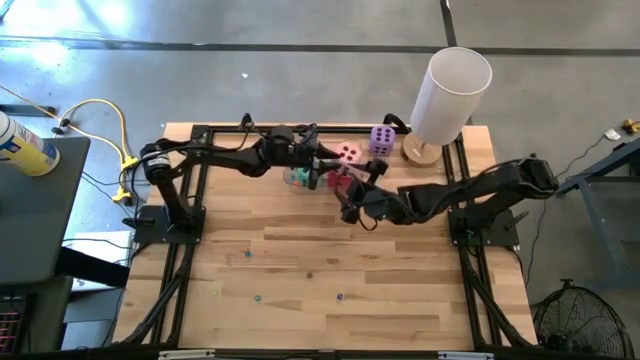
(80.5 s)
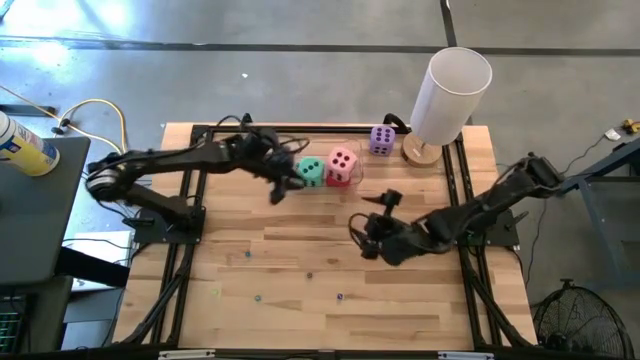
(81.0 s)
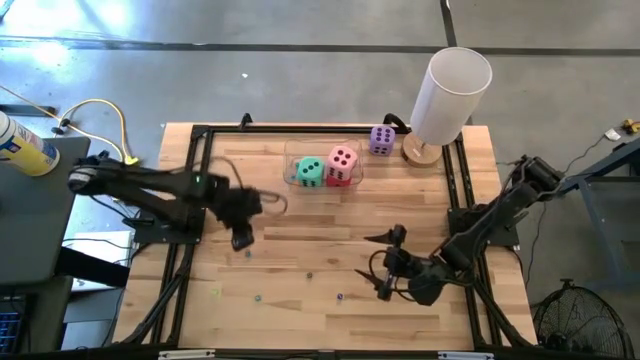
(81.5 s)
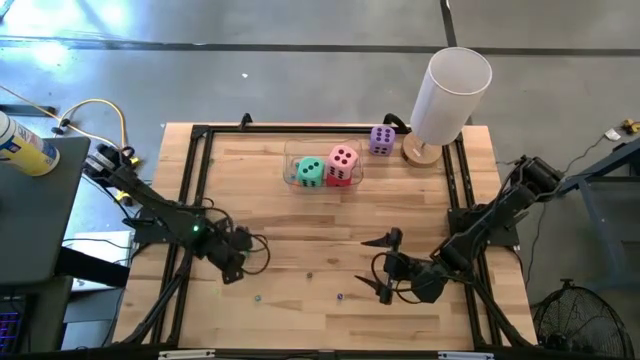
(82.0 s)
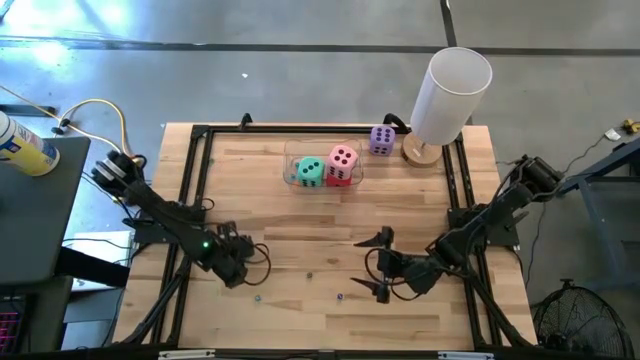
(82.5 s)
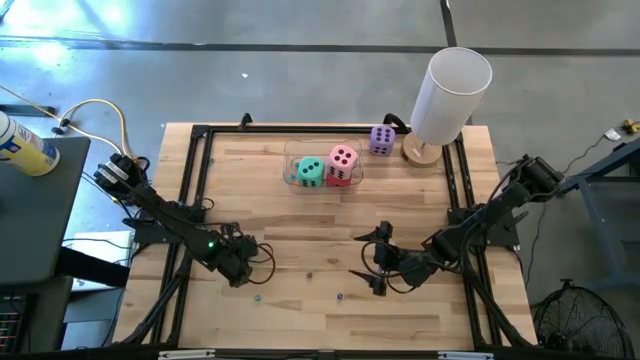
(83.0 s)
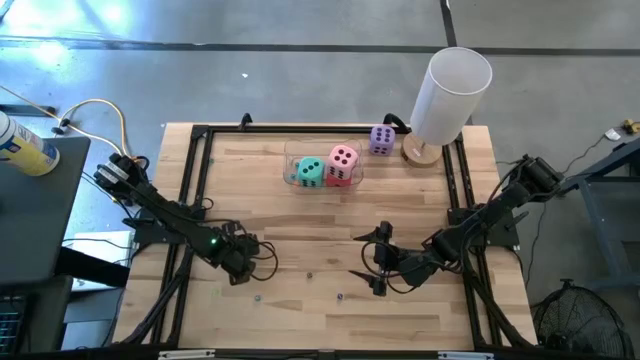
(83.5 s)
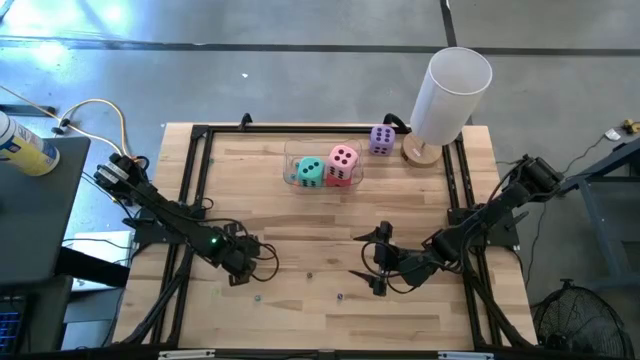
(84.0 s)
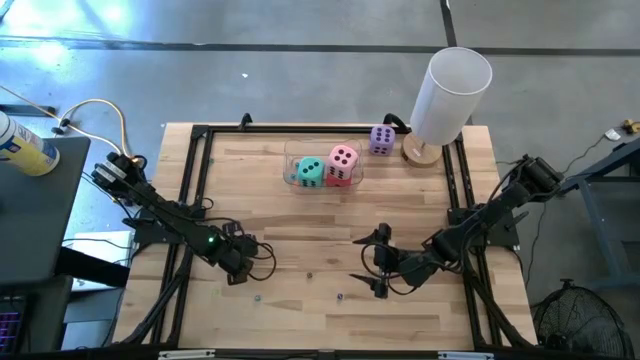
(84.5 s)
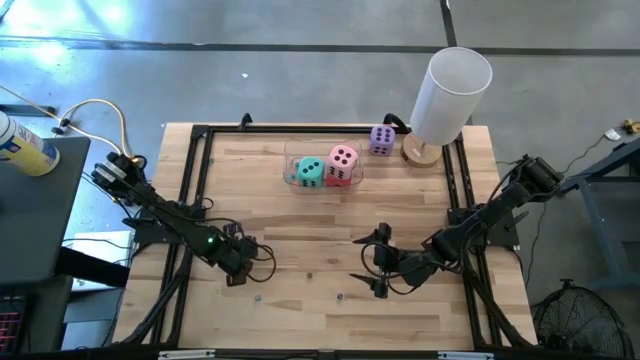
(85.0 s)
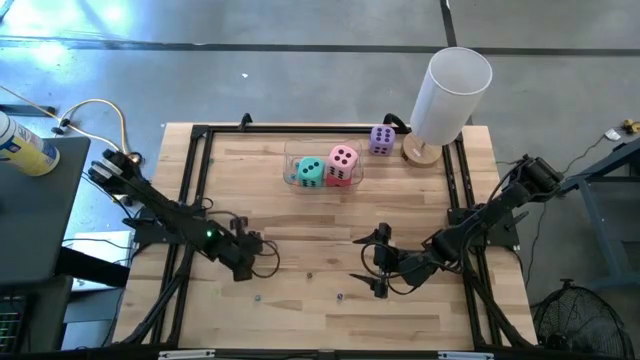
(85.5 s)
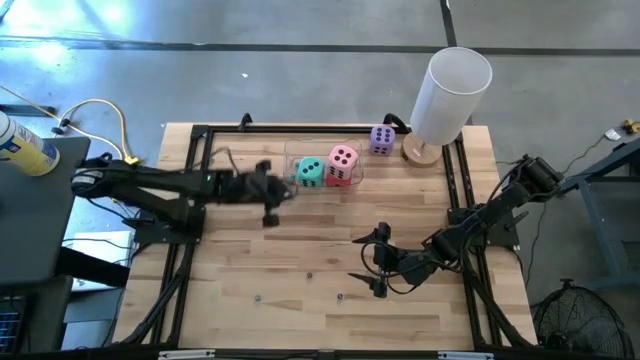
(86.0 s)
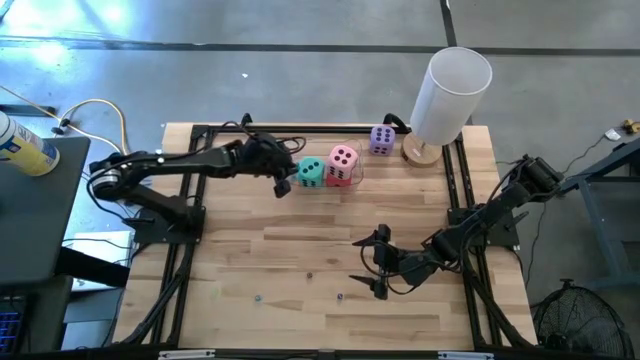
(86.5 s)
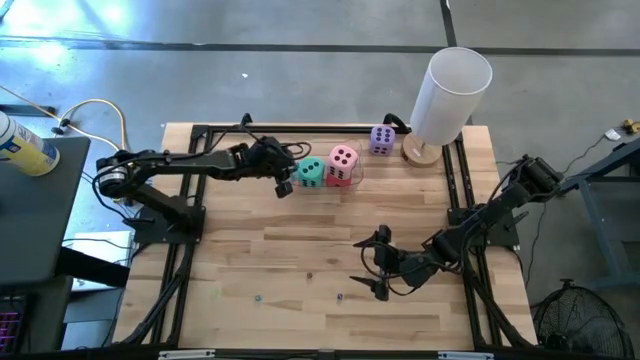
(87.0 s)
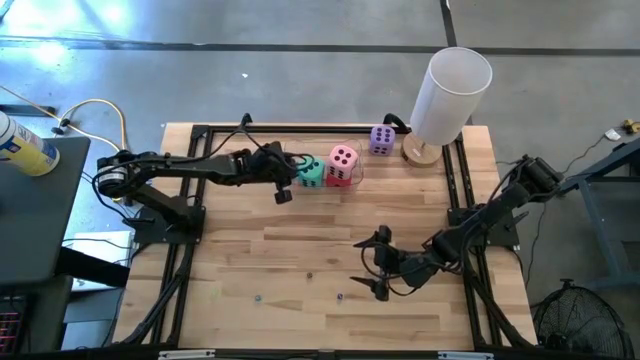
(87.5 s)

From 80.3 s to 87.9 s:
Task: Pick & Place Dice
Put the small light blue dice into the transparent bin

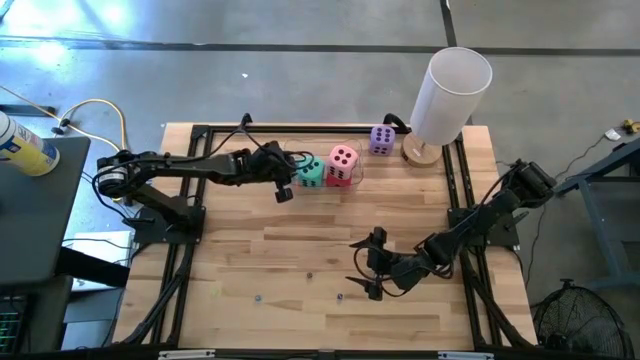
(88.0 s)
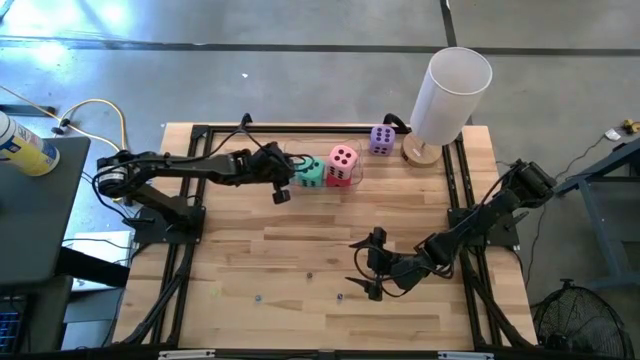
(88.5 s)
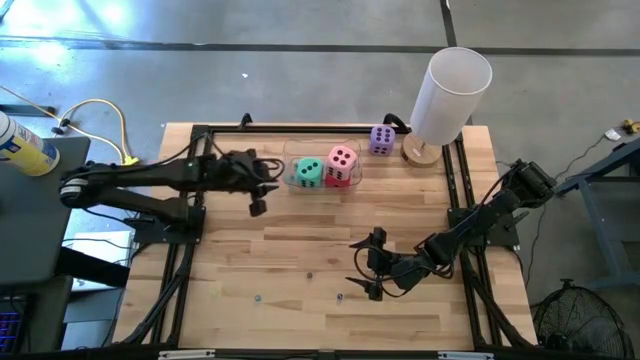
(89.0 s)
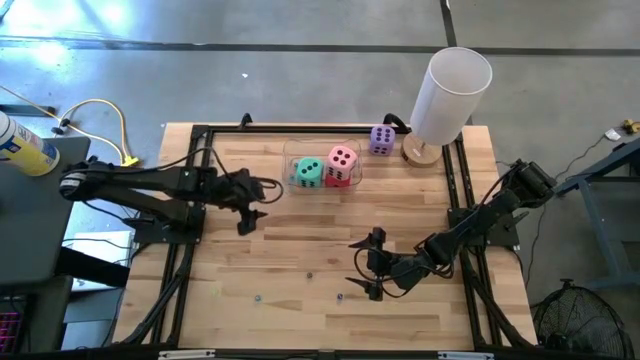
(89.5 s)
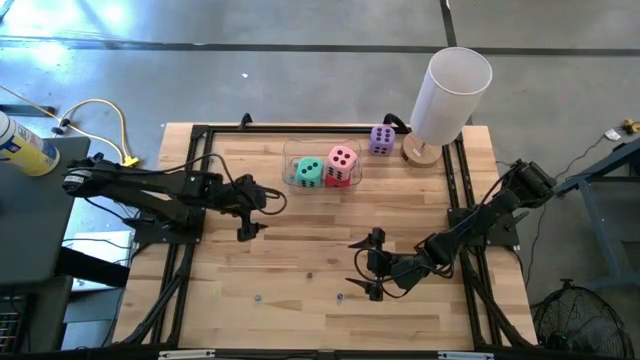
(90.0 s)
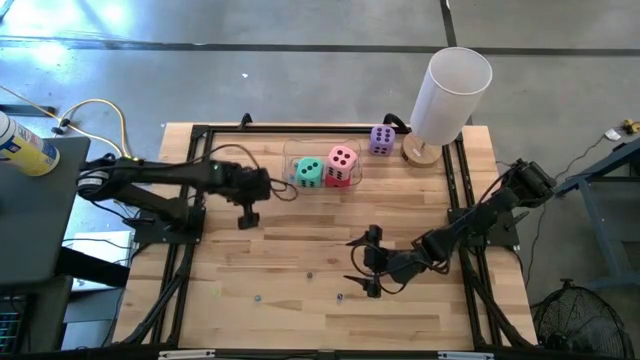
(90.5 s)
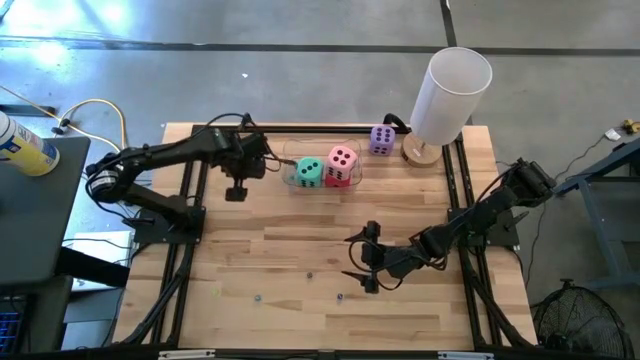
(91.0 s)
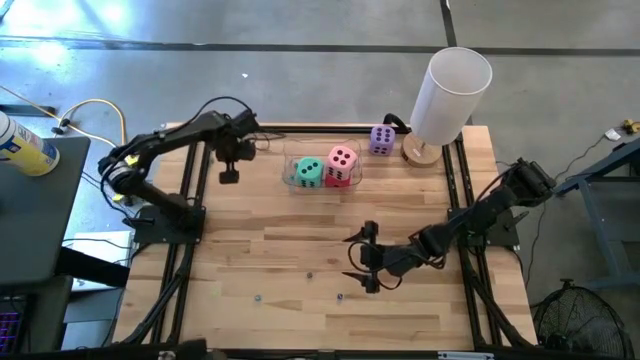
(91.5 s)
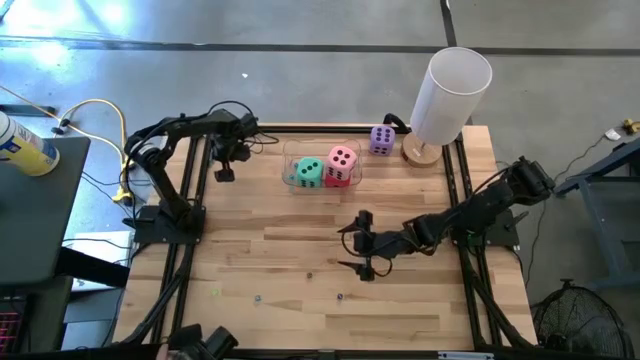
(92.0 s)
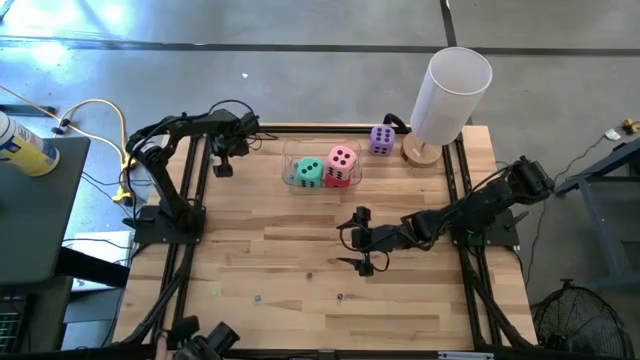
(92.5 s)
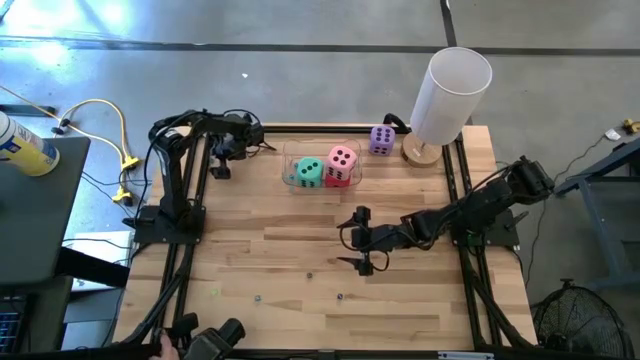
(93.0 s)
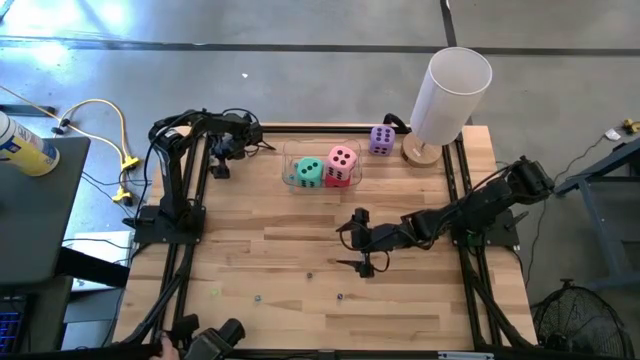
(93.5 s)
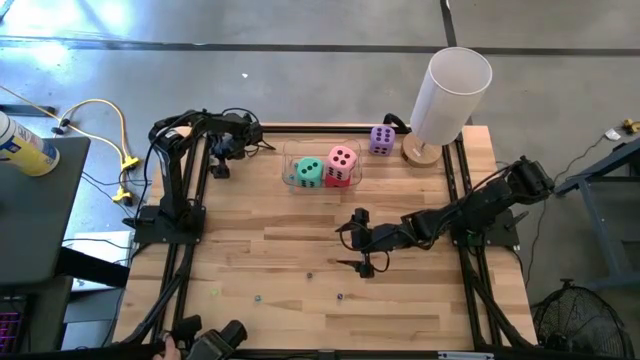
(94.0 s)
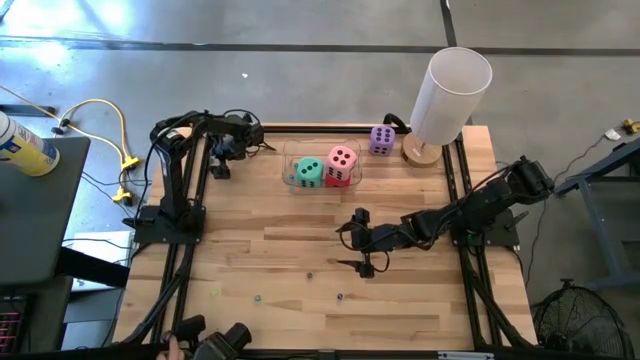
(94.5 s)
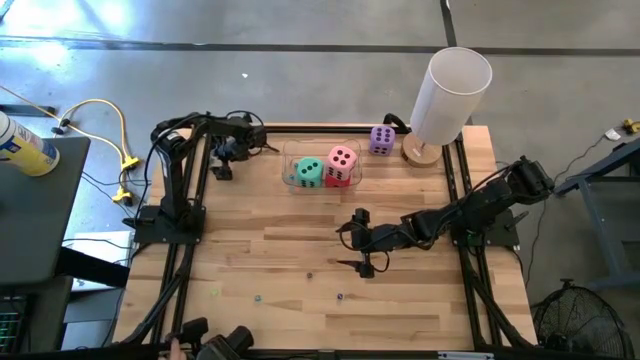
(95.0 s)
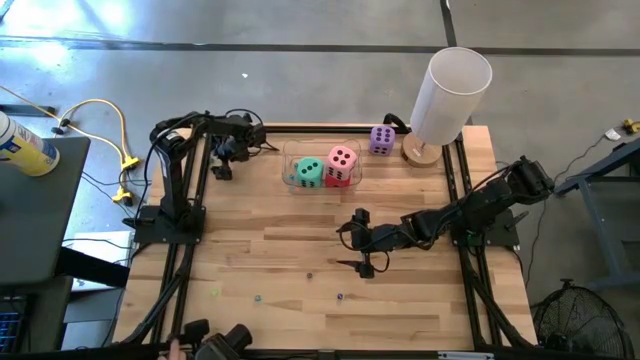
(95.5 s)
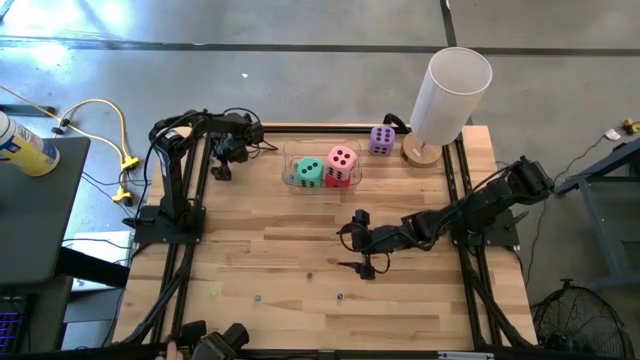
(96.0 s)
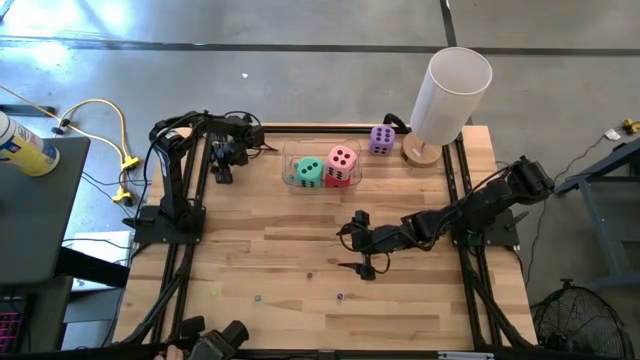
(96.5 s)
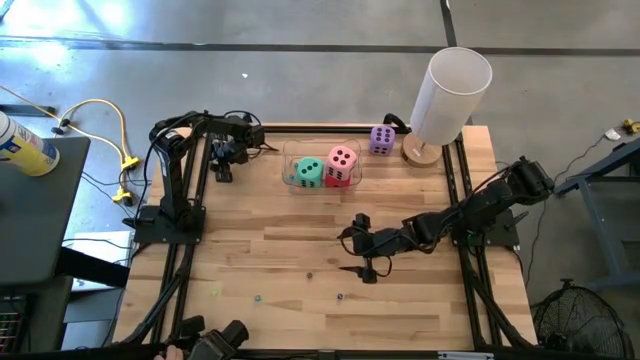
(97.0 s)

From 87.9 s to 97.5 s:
Put the small green dice into the transparent bin

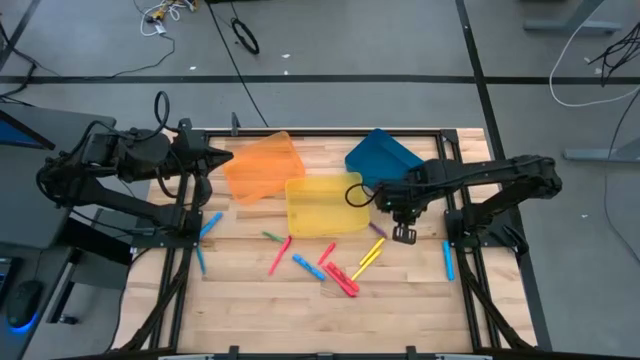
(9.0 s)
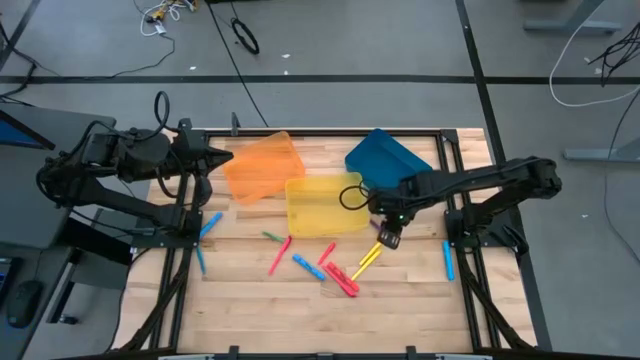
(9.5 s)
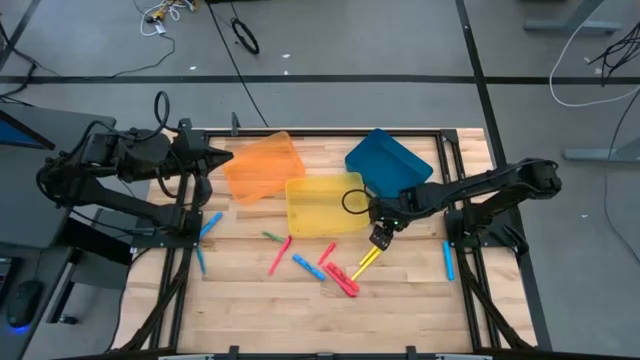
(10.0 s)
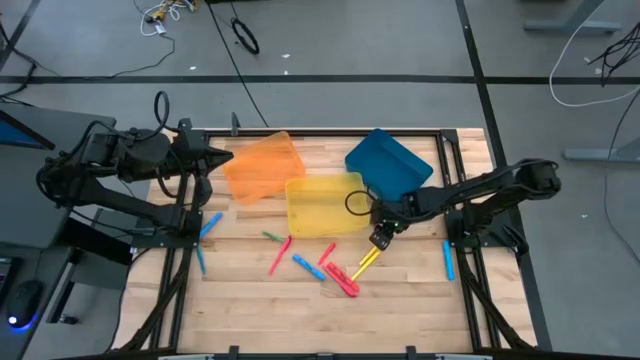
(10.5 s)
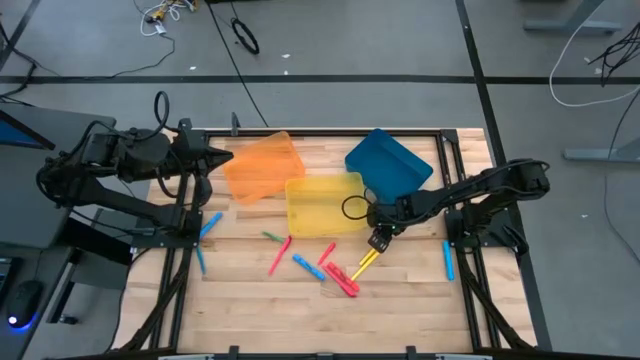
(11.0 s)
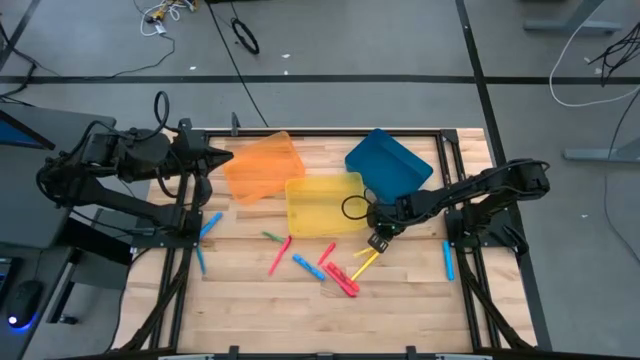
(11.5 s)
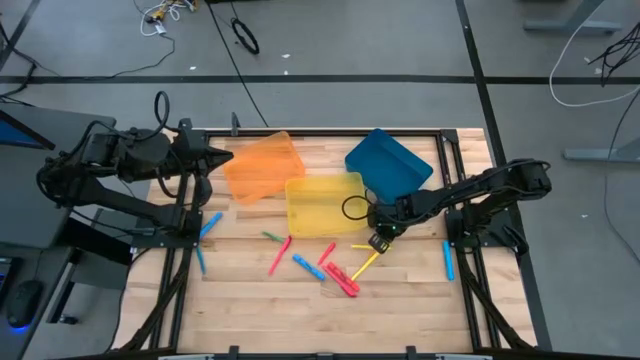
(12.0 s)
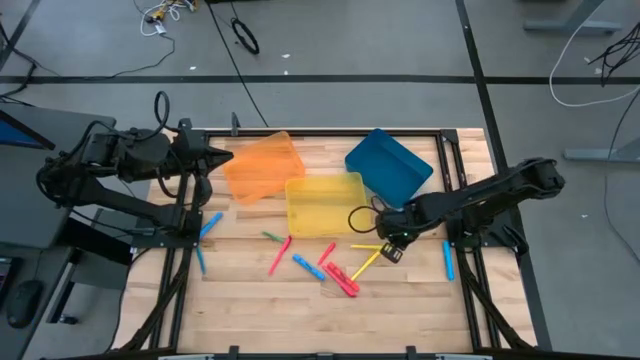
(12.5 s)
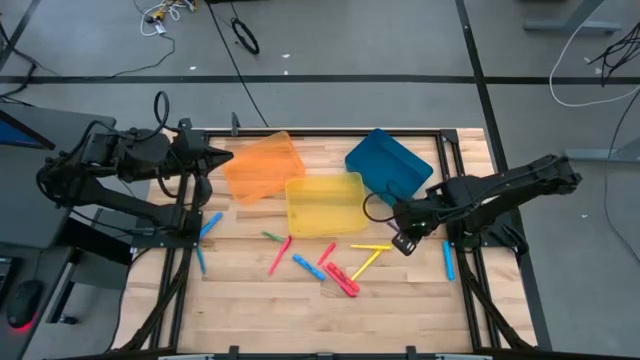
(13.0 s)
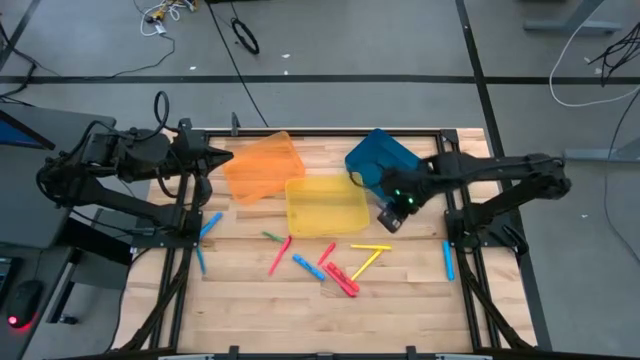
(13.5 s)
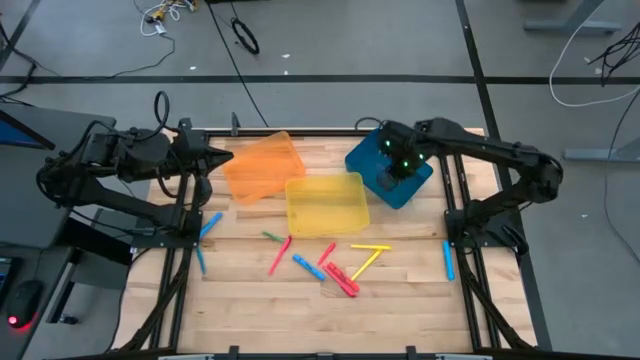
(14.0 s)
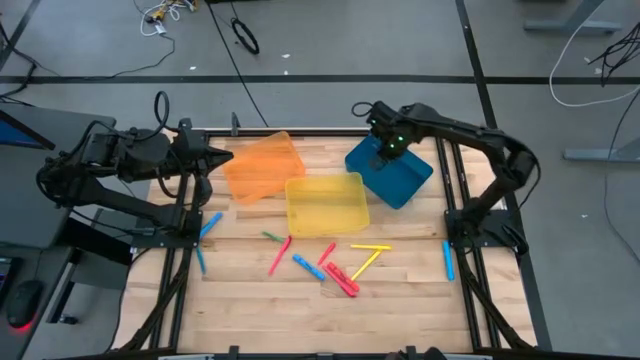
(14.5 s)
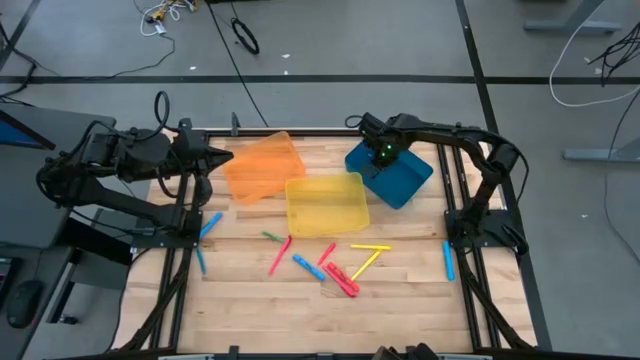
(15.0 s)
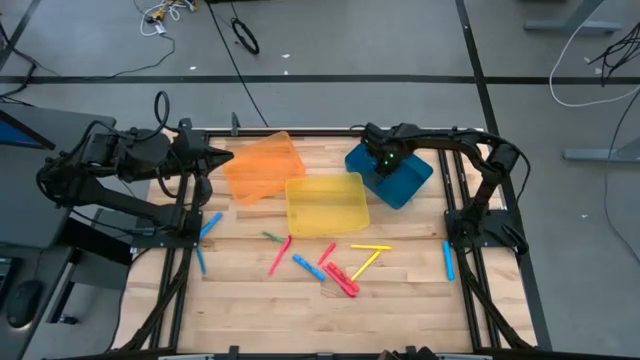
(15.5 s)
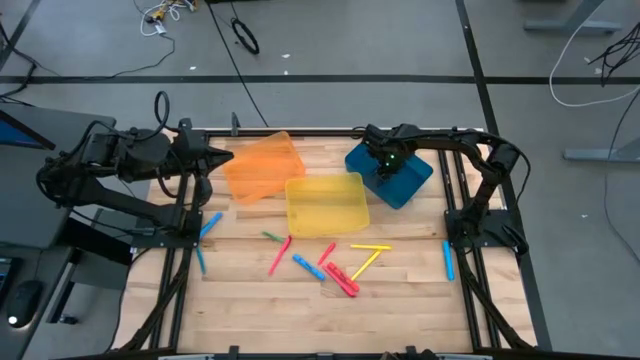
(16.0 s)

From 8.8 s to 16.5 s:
Task: Pick & Place Markers
Put the purple pen into the blue bin
